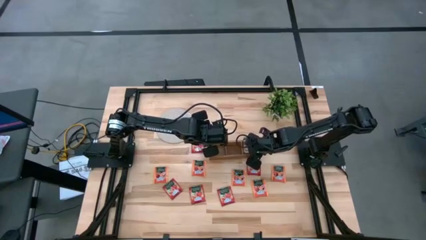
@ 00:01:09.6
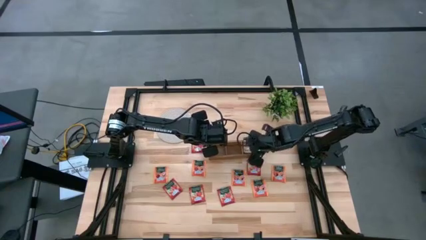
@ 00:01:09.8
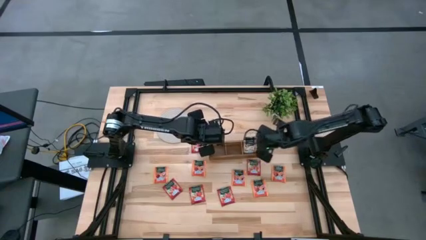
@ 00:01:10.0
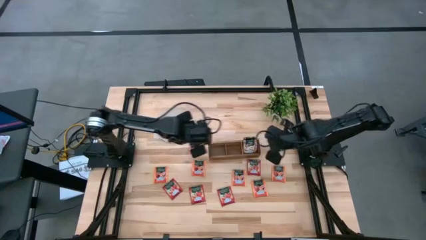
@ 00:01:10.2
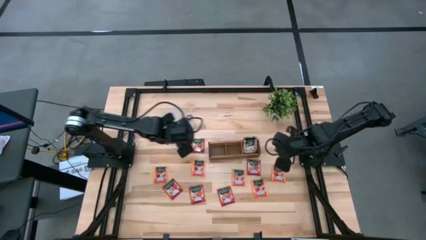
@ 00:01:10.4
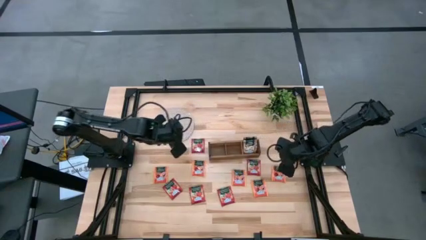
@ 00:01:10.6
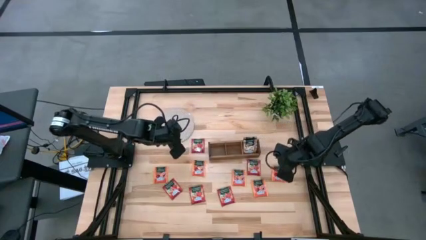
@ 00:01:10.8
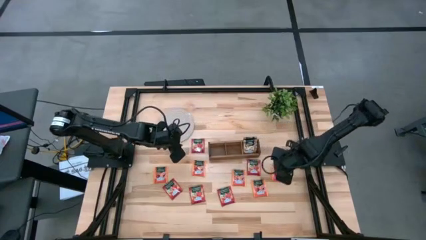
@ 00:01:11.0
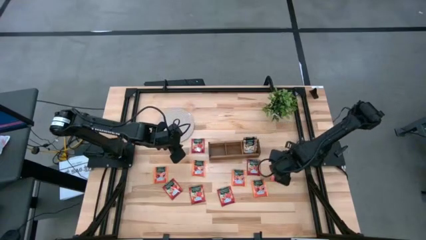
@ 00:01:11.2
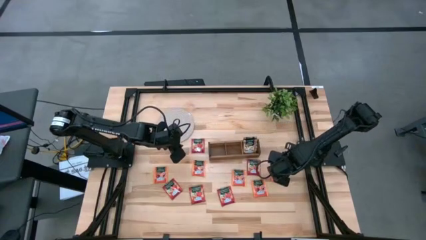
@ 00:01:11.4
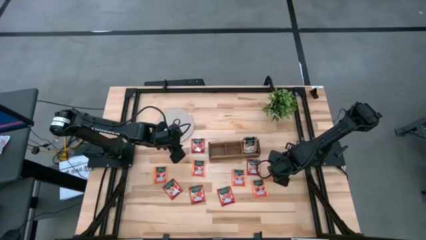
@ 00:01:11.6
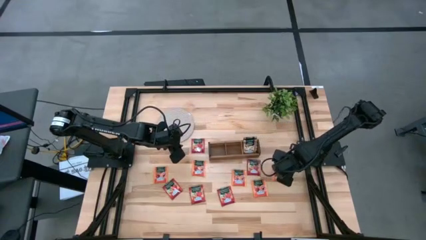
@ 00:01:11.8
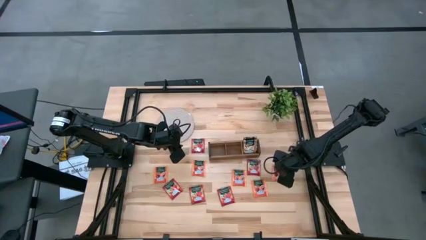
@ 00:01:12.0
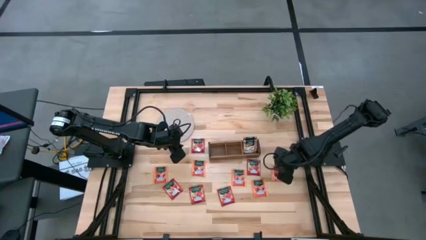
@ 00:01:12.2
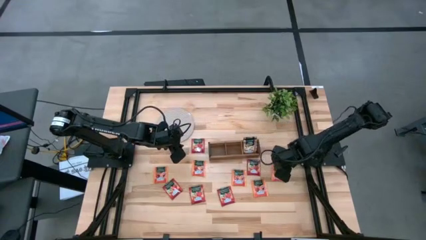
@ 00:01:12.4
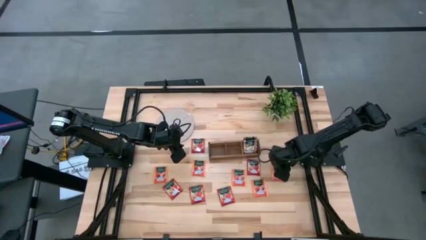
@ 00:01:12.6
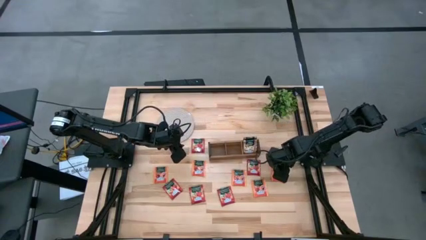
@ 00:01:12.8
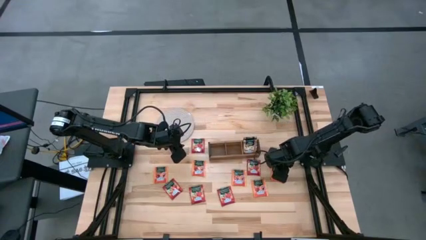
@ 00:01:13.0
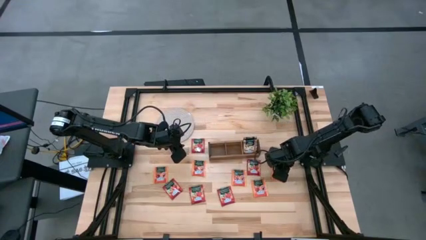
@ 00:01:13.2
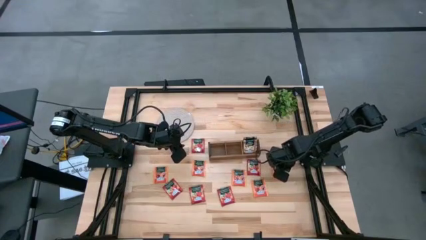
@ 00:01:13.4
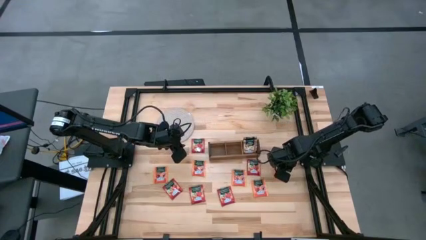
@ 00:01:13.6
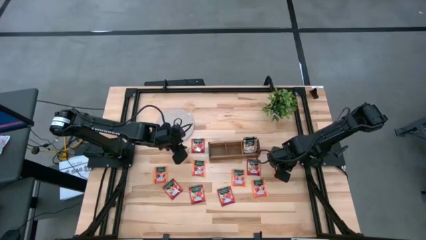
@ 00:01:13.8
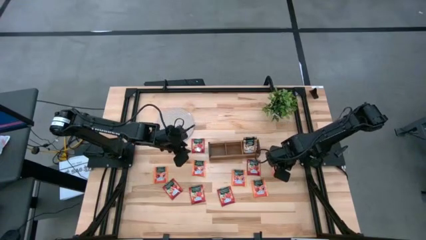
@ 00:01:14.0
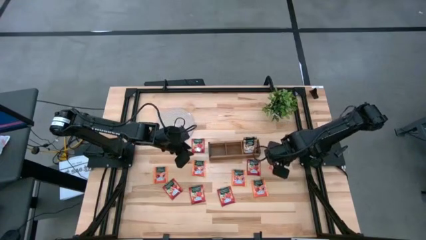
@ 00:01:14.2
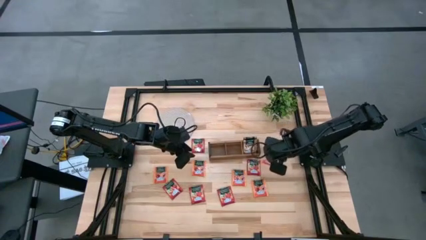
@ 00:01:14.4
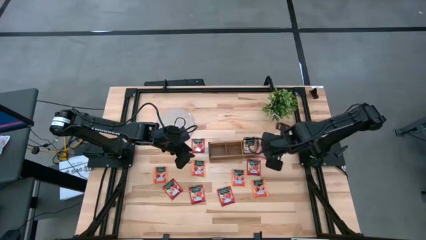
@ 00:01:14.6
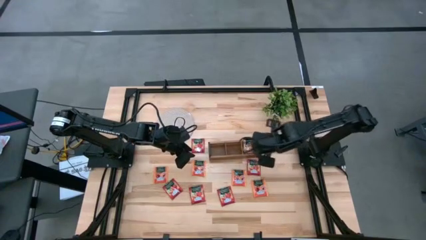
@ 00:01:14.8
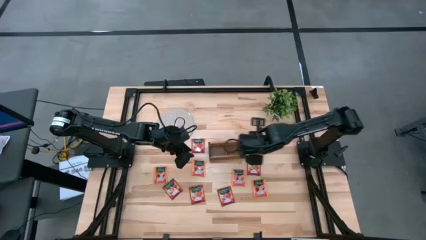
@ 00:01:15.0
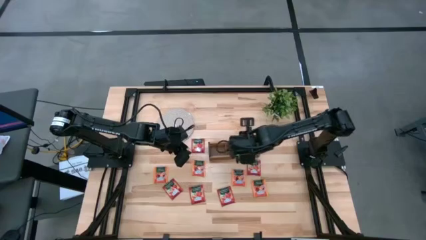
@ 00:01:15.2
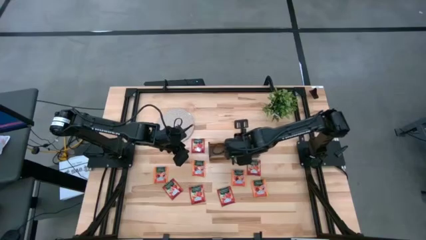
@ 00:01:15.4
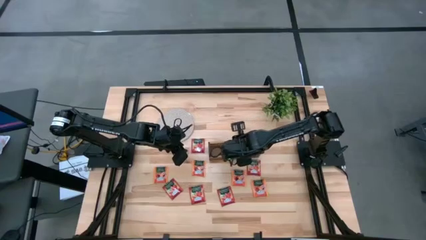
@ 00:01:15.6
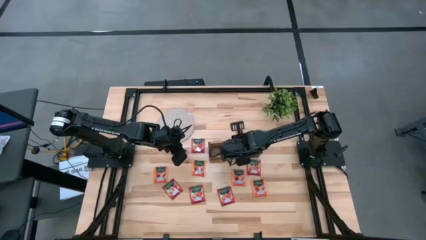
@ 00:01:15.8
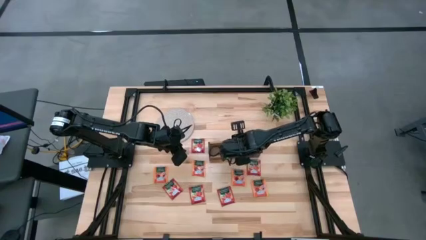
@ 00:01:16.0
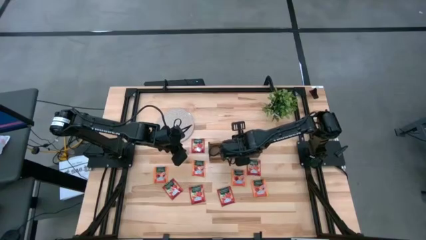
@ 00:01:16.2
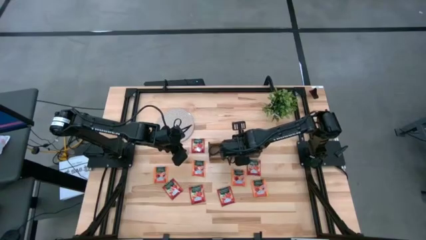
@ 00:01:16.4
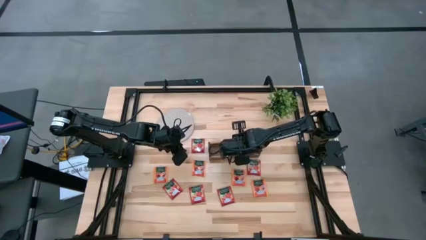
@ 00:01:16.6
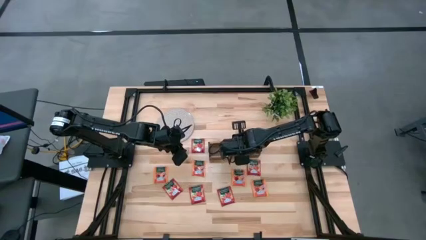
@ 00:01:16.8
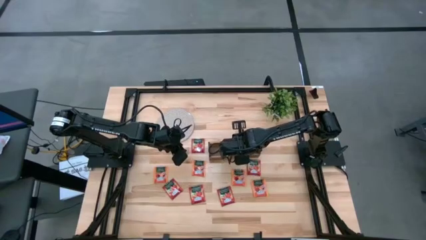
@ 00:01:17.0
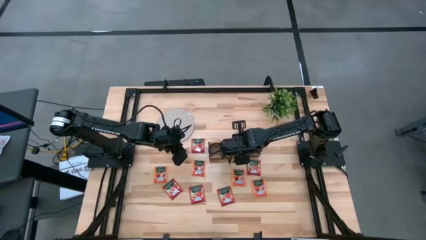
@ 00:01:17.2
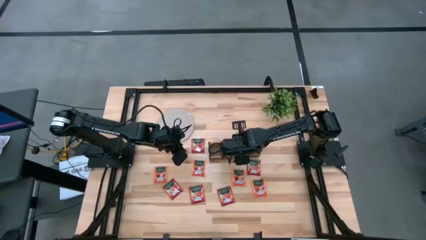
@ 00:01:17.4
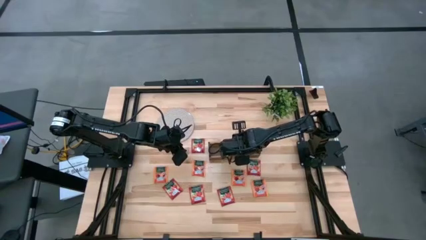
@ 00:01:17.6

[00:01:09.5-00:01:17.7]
Task: Pick & Place Tea
Put the orange tea bag into the middle section of the wooden organizer

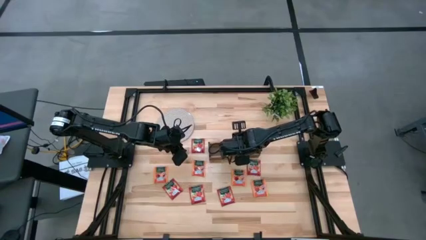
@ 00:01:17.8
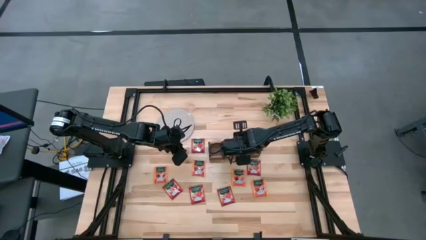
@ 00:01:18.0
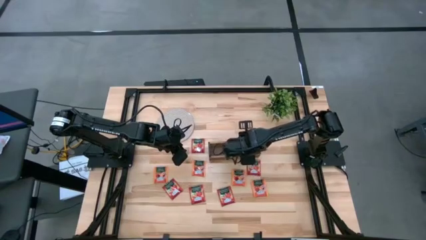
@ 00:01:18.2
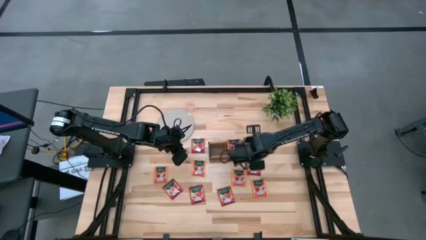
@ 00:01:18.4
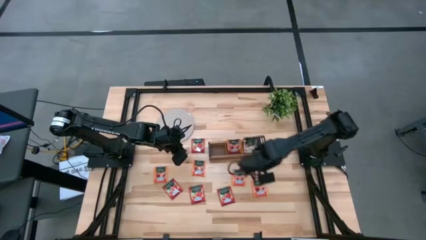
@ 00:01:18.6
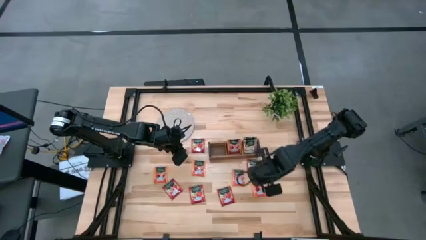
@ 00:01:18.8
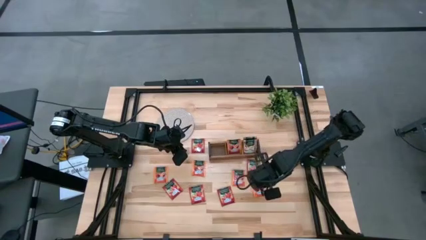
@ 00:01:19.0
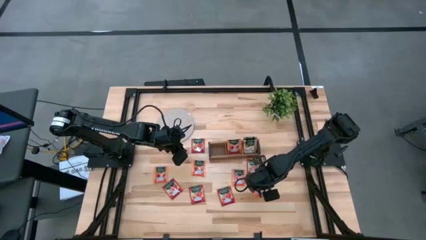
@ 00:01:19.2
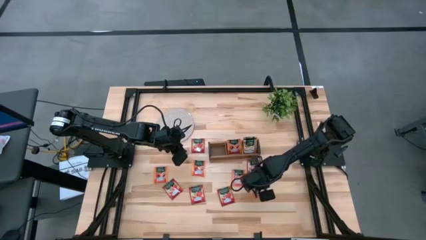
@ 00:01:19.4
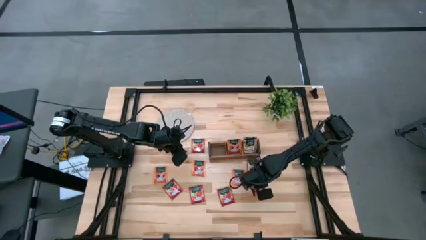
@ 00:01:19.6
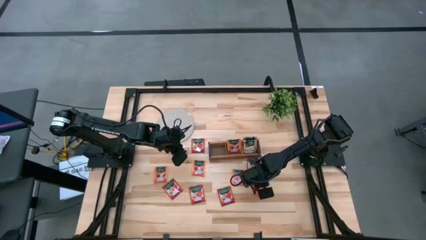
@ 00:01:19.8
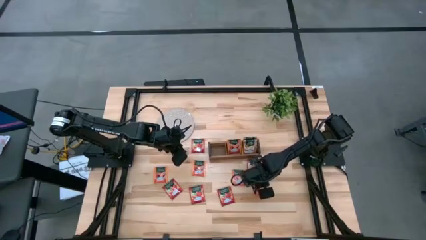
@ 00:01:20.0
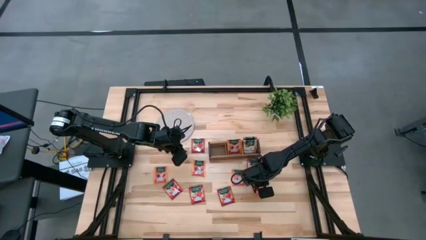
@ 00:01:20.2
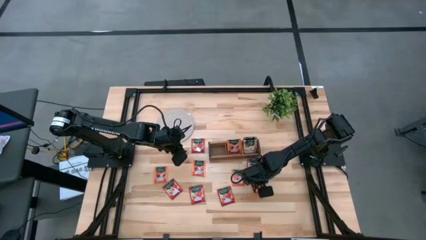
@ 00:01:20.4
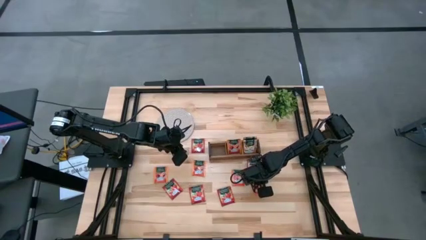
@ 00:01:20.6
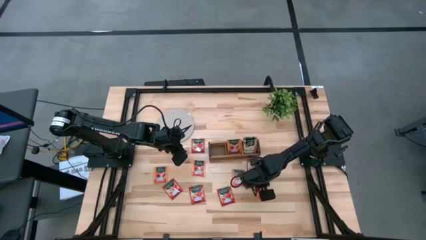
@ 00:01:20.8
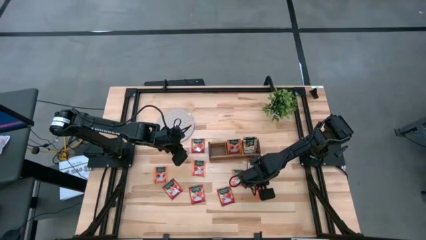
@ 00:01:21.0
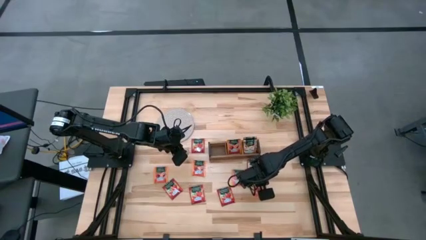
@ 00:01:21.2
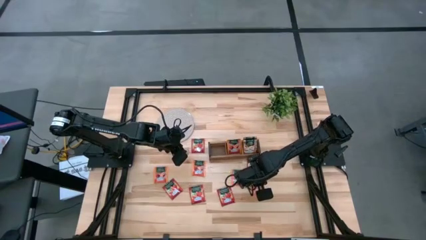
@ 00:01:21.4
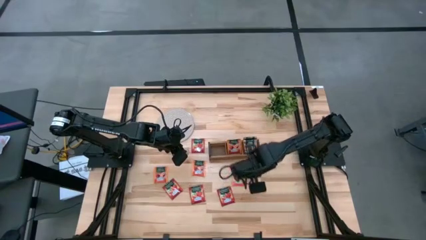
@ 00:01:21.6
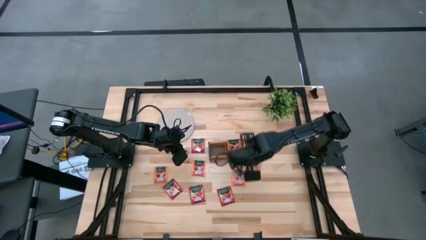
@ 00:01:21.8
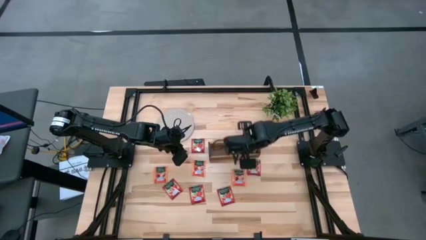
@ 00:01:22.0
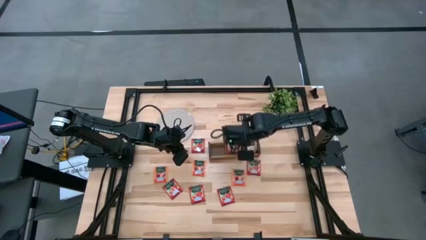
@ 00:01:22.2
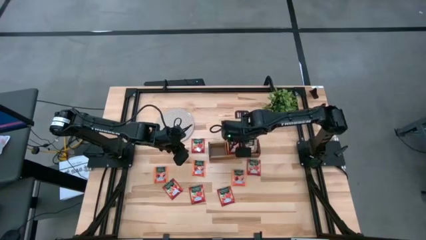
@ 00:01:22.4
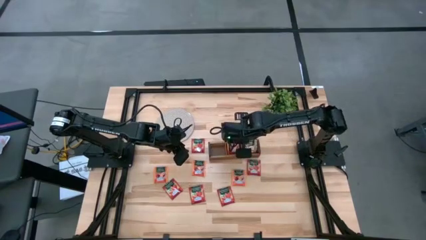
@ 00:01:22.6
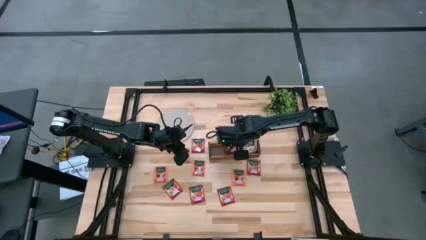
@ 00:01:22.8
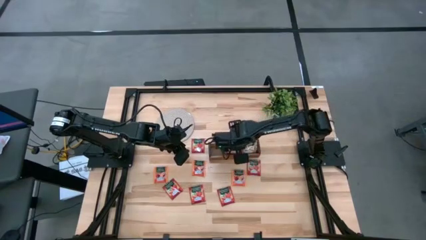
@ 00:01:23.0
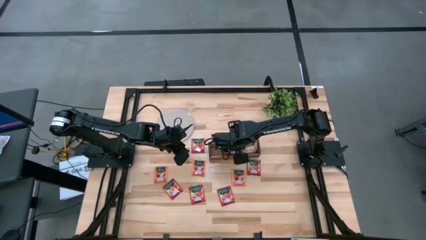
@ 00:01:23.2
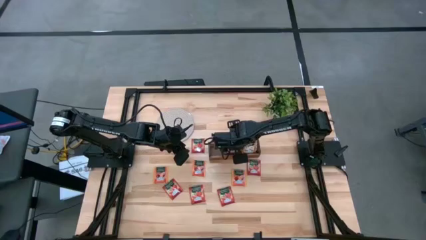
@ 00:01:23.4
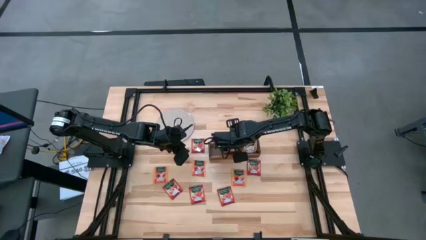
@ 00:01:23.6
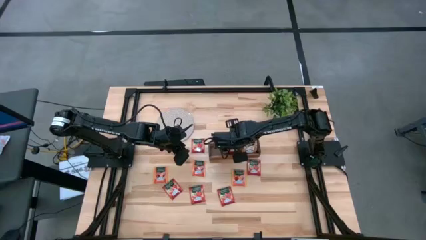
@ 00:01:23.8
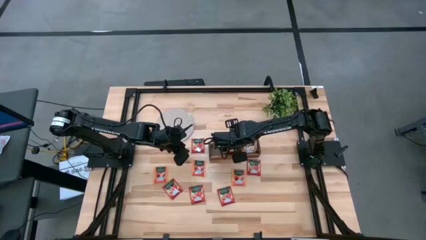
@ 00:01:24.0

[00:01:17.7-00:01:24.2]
Put the orange tea bag into the middle section of the wooden organizer

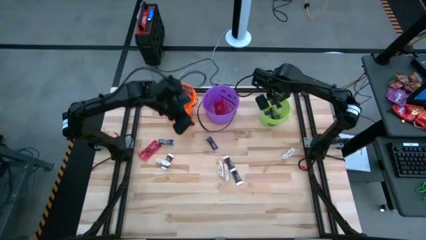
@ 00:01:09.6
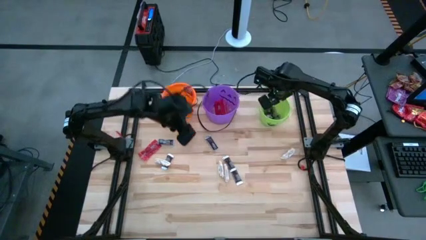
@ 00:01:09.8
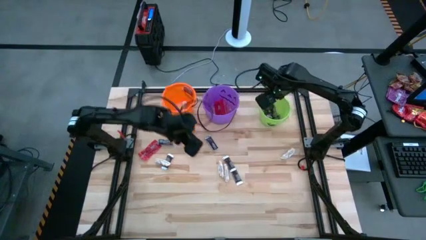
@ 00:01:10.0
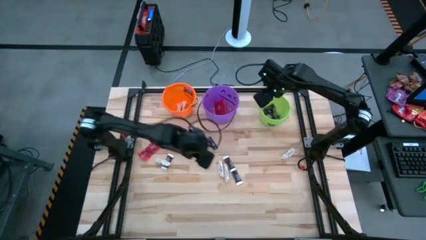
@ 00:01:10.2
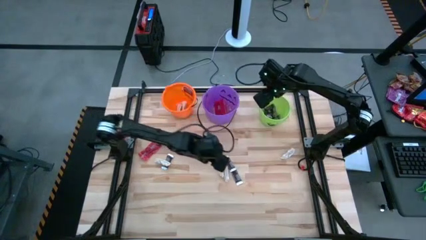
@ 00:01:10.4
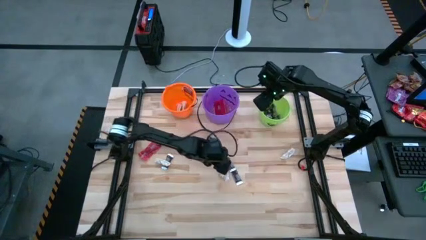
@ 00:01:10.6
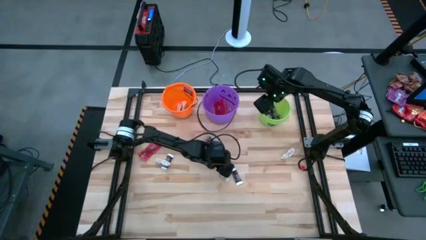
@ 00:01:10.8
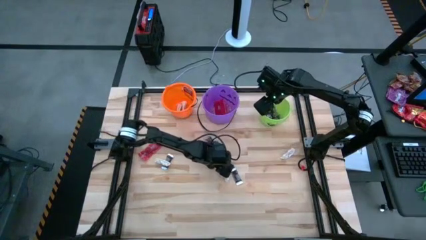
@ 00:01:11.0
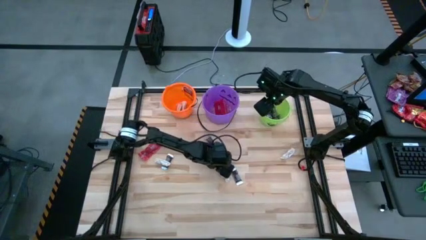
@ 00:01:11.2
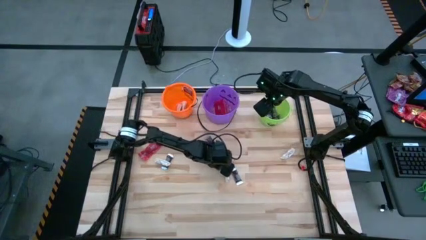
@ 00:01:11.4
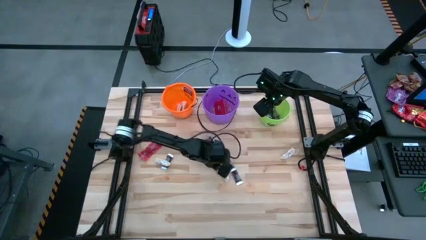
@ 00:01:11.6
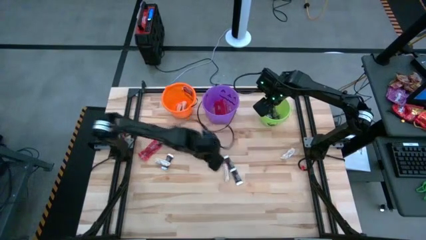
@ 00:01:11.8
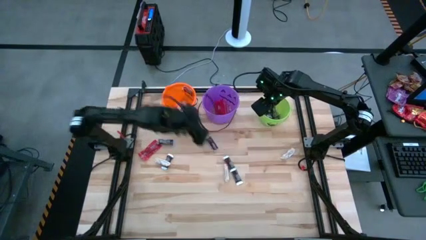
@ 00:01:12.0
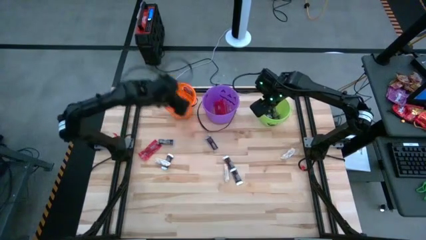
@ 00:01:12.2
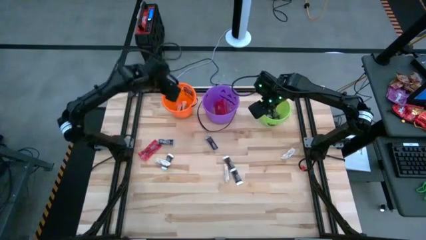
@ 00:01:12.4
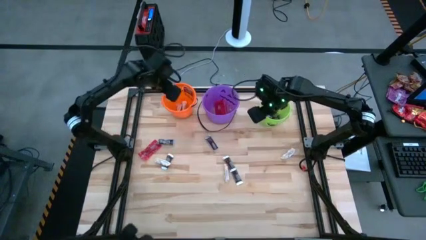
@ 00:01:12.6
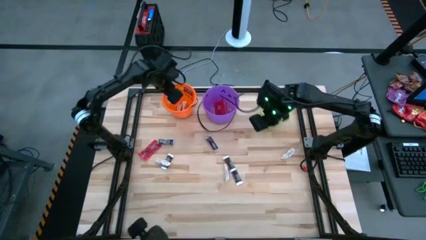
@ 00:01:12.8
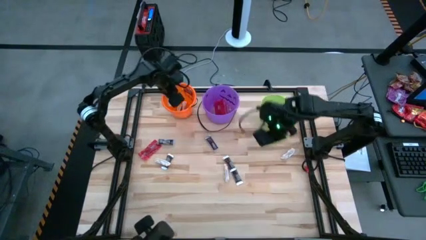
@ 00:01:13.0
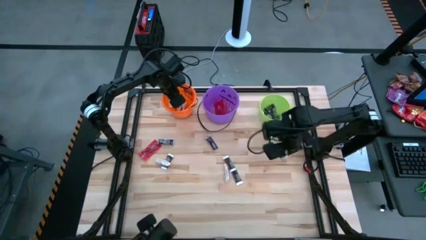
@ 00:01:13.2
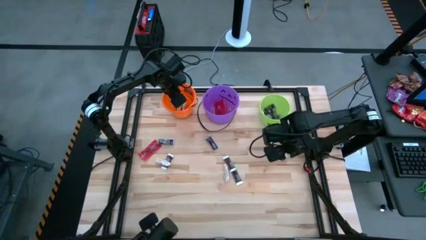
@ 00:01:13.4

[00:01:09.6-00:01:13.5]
Task: Sort candy by brand, put in halloween buckets
Put the white chocolate bar into the orange bucket
